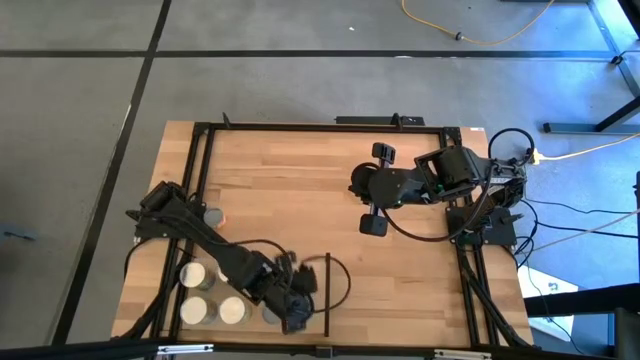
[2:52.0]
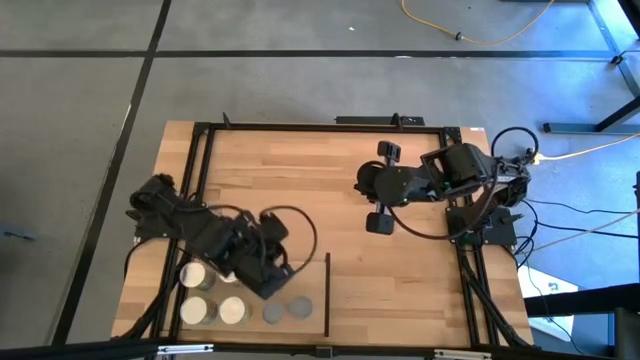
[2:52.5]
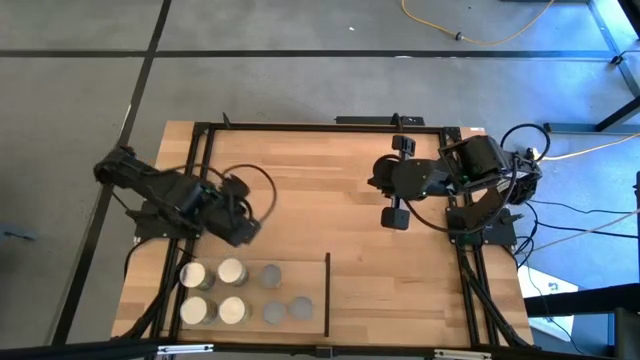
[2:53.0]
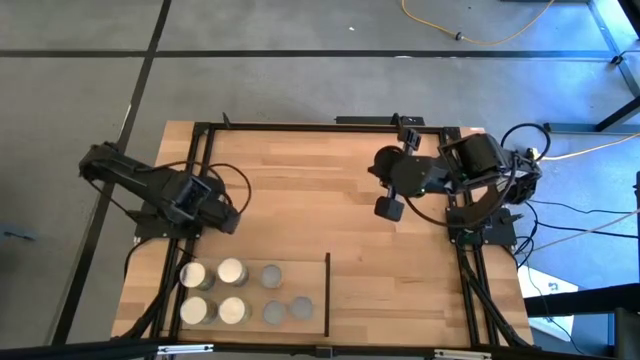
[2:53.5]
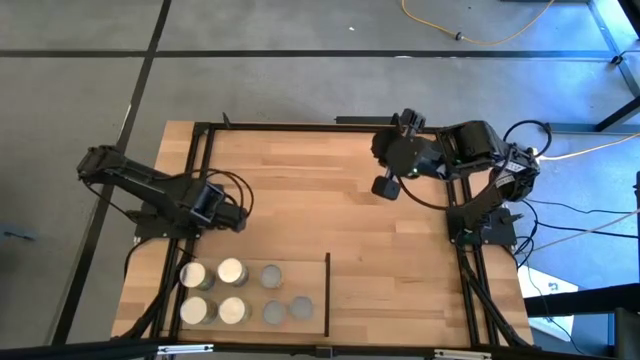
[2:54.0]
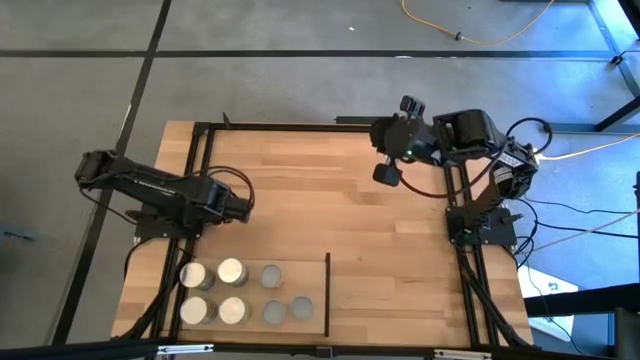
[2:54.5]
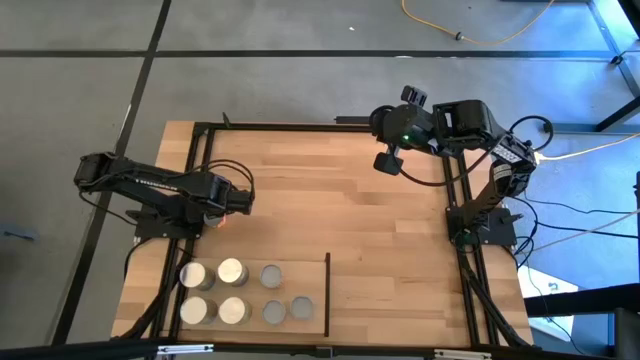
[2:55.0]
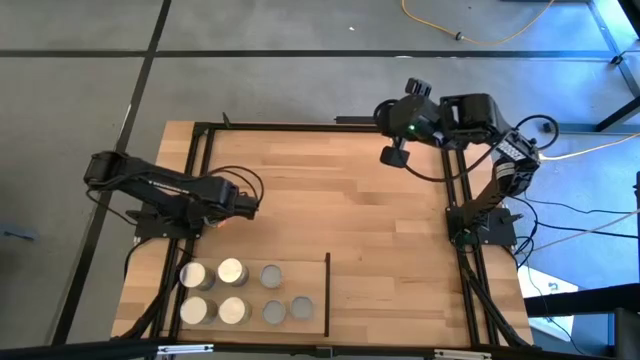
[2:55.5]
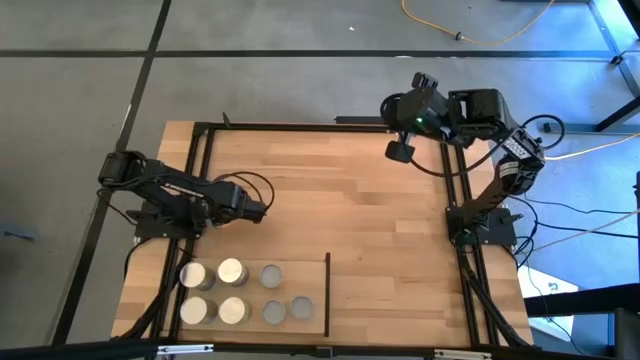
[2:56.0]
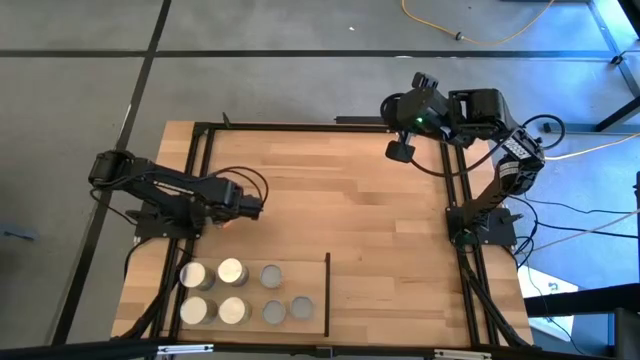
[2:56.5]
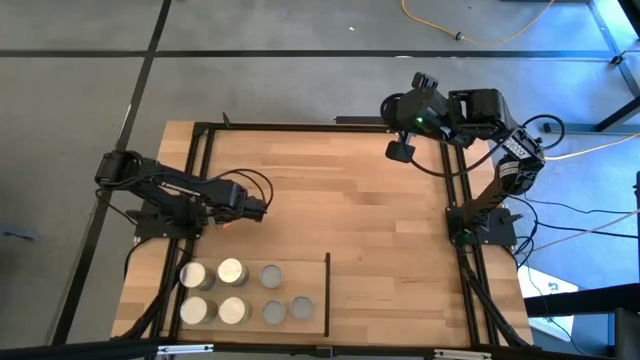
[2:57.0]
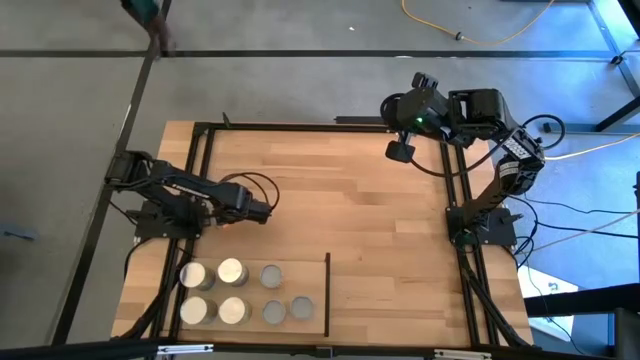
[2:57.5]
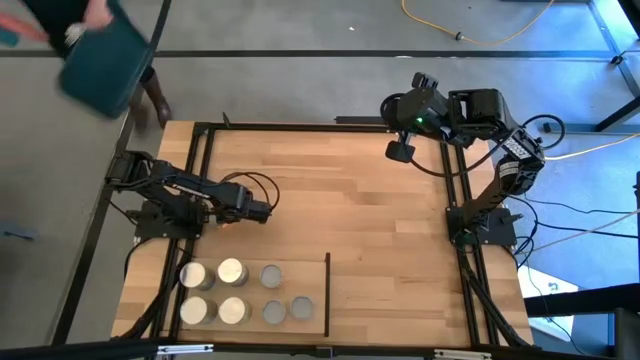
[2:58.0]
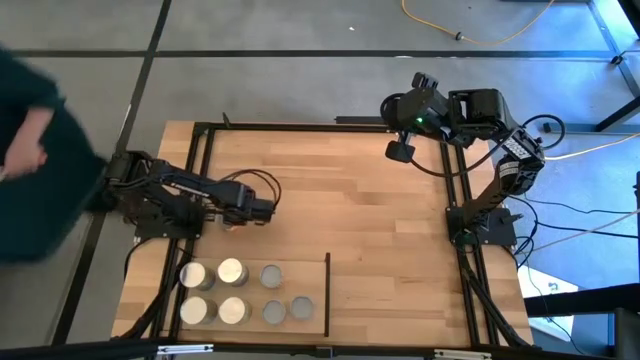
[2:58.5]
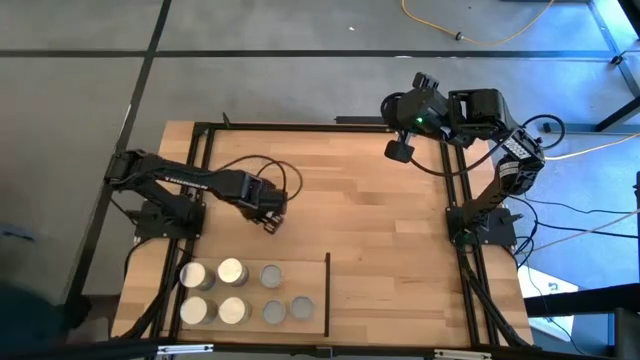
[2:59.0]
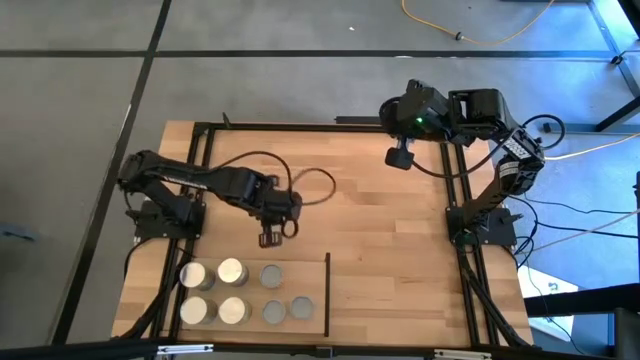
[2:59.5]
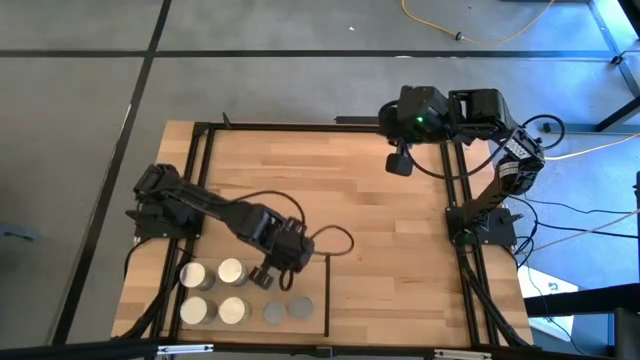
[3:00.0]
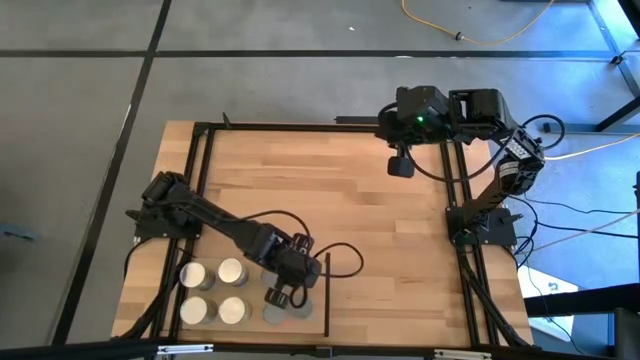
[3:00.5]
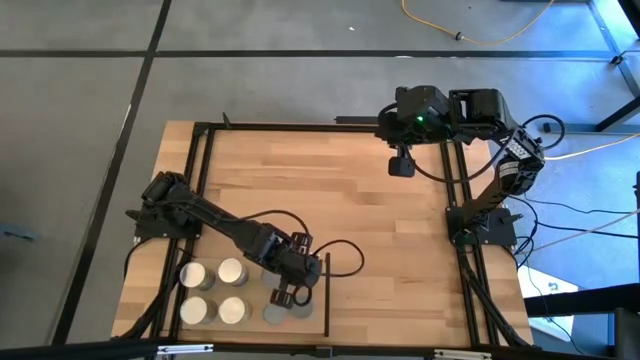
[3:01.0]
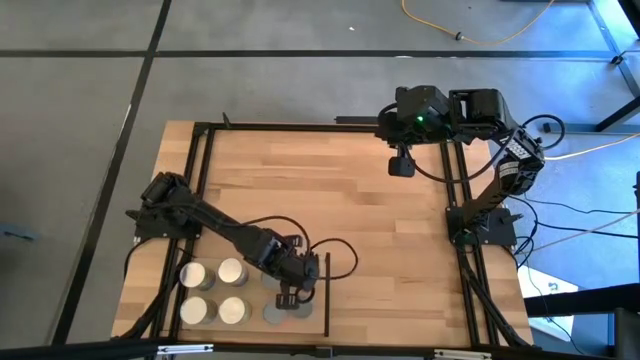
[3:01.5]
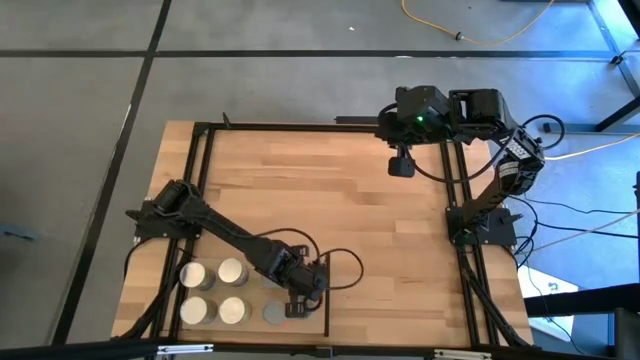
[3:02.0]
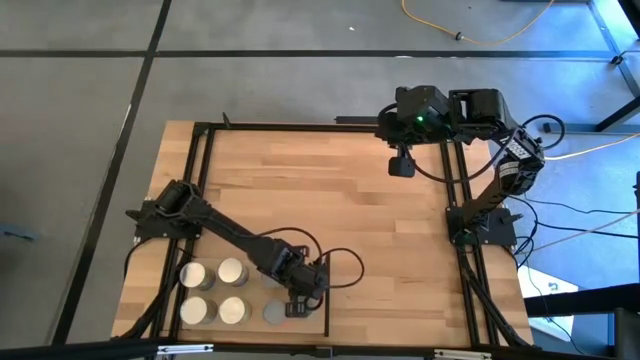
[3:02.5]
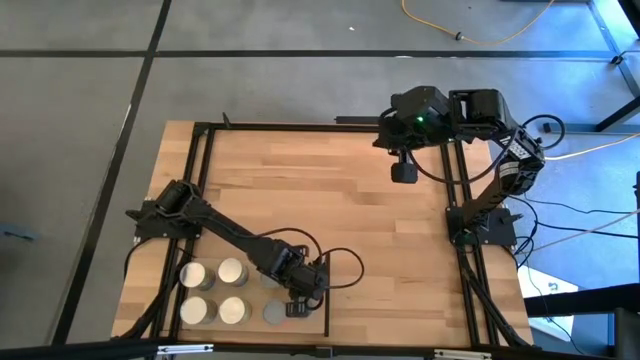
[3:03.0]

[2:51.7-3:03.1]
Task: Pick and place cans onto a shelf
Put the canned pineapple rings on the shelf

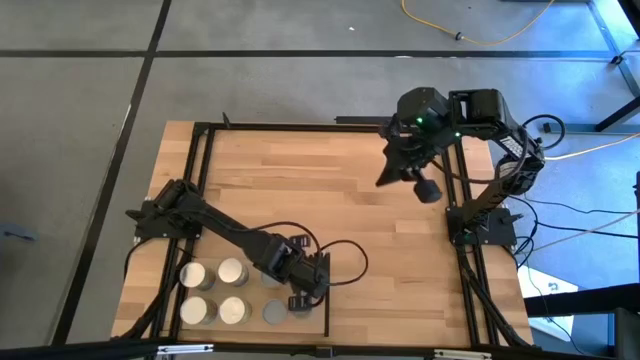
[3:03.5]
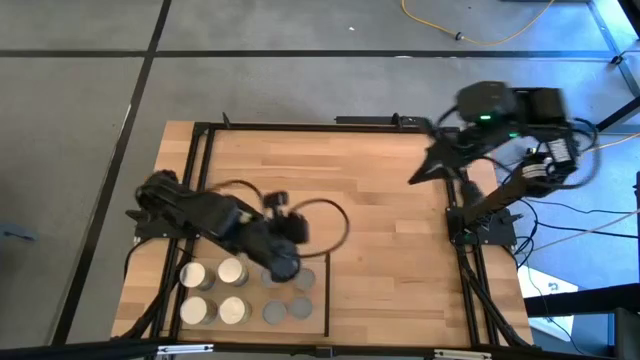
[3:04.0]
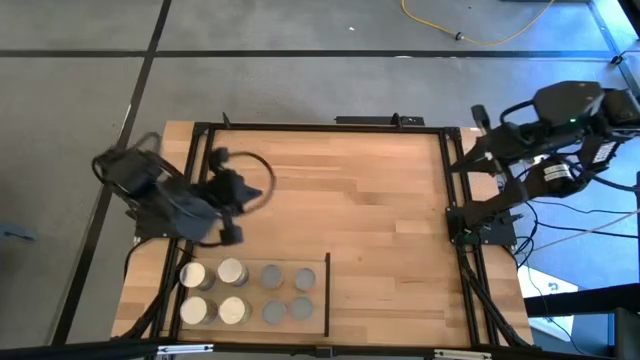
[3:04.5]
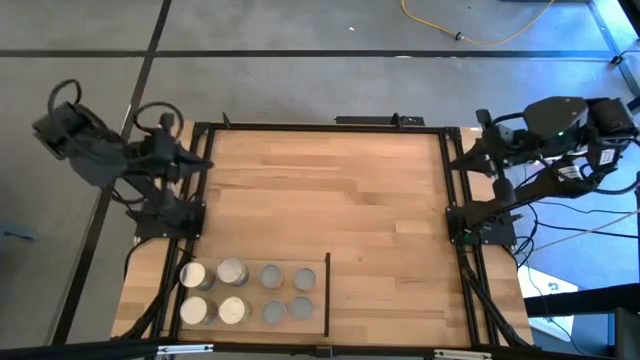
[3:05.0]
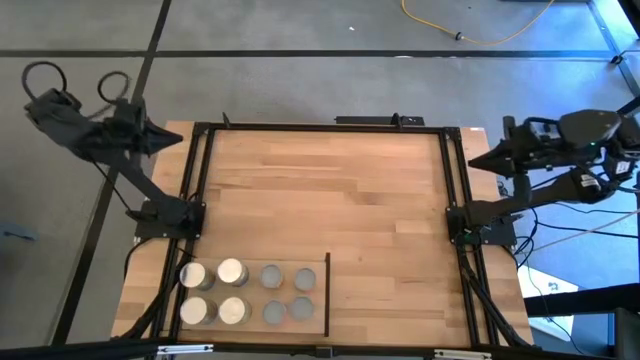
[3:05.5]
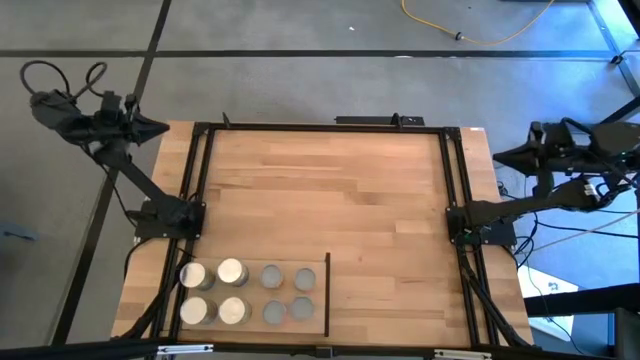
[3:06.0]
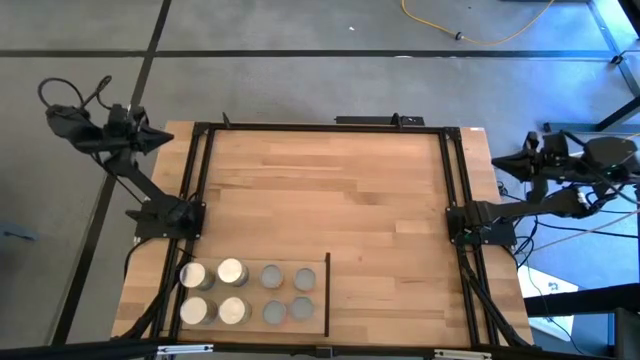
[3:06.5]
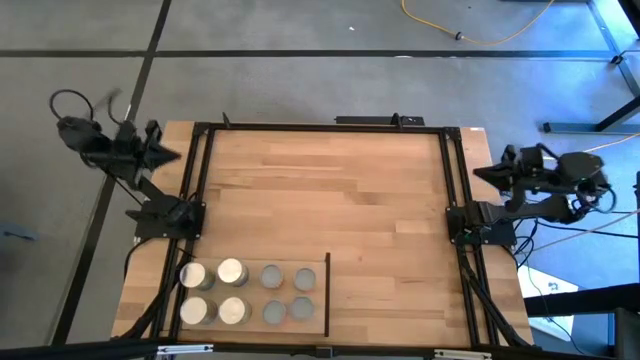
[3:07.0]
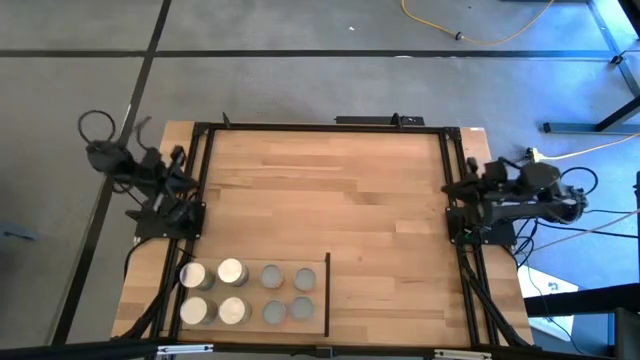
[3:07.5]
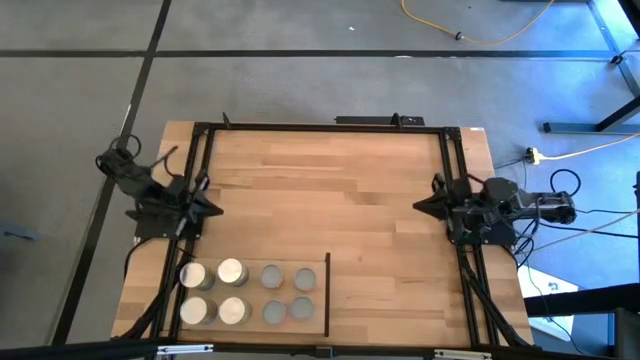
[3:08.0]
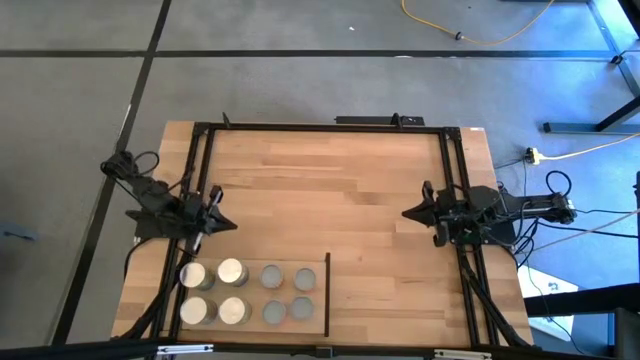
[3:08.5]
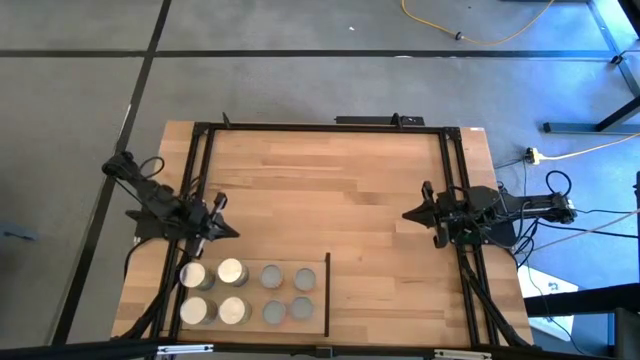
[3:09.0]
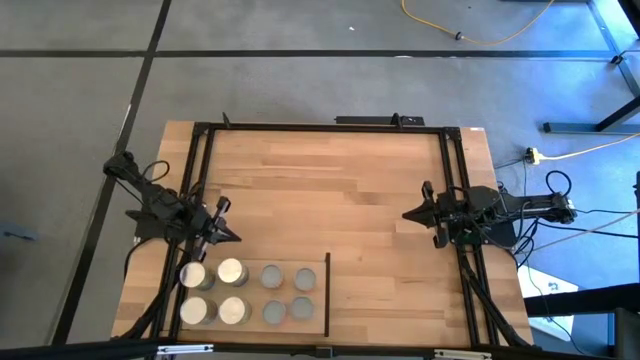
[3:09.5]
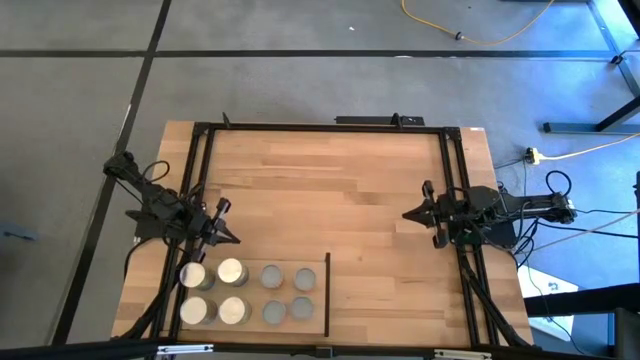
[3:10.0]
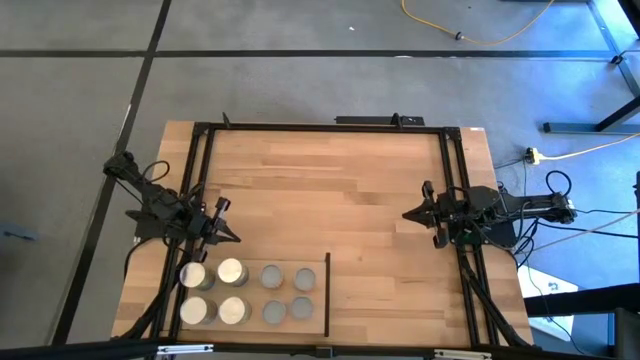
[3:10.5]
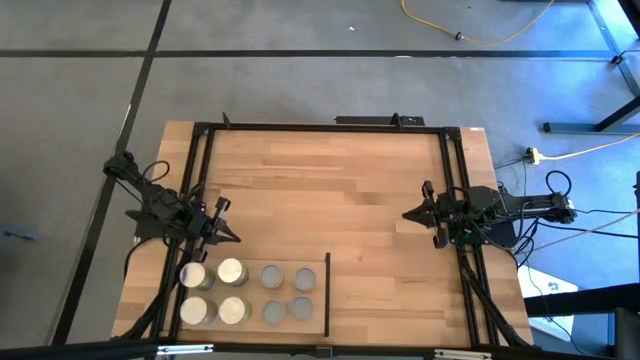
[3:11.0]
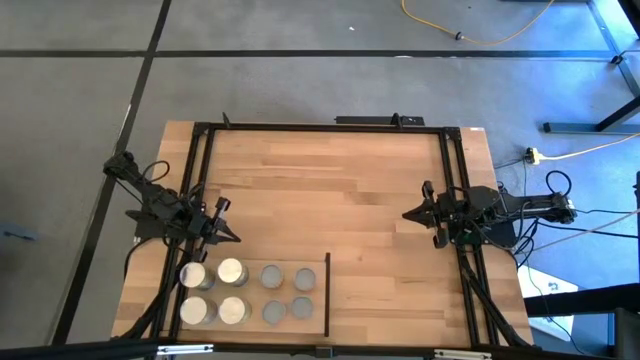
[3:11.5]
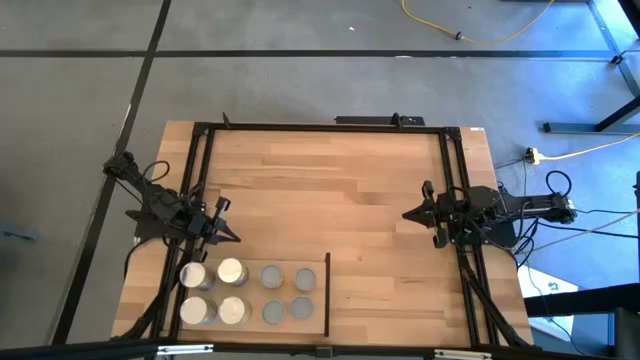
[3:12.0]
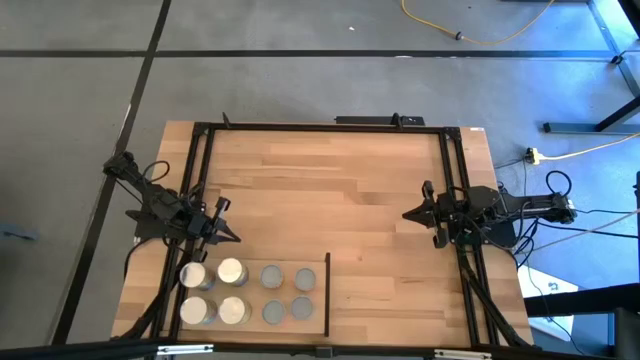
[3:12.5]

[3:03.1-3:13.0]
Return to Home Position
